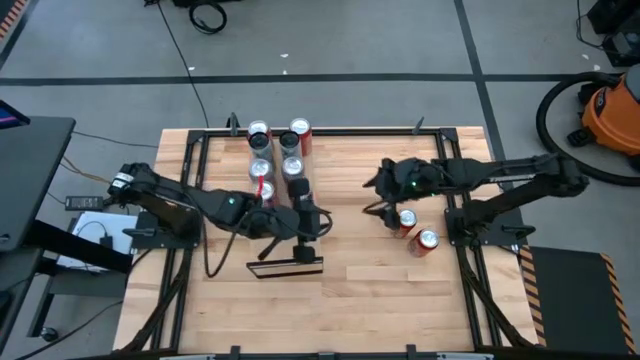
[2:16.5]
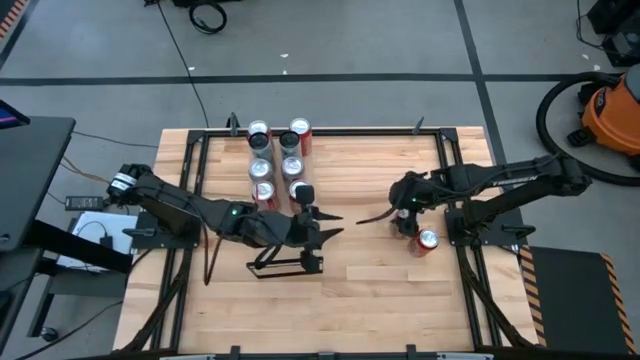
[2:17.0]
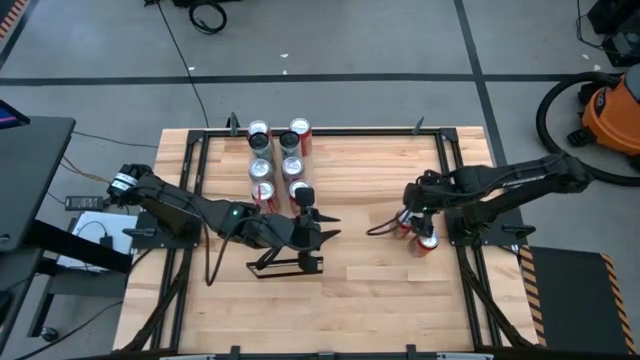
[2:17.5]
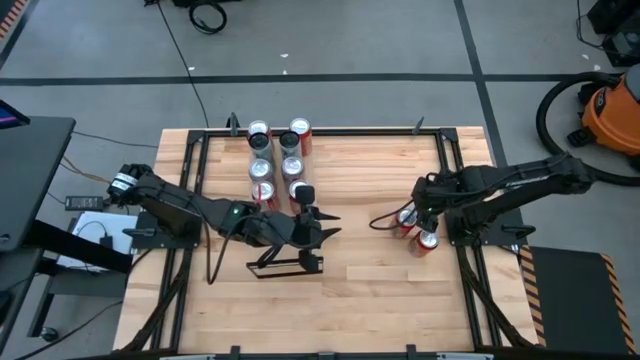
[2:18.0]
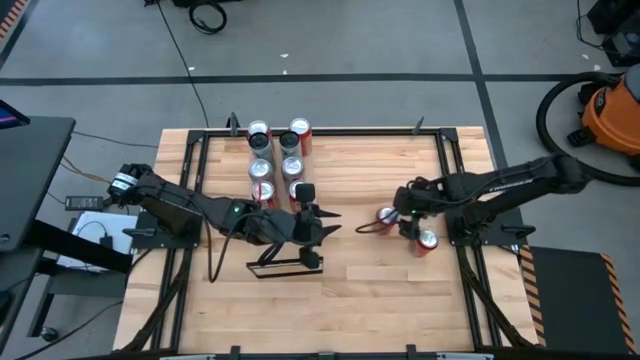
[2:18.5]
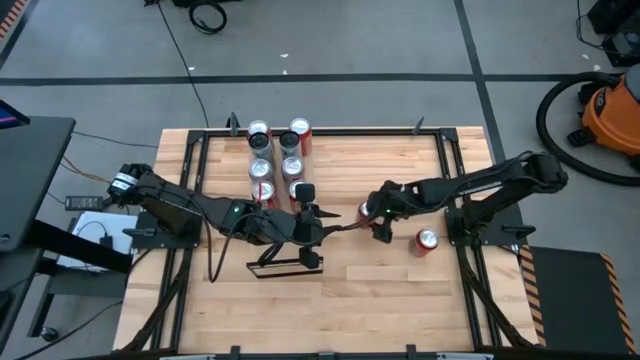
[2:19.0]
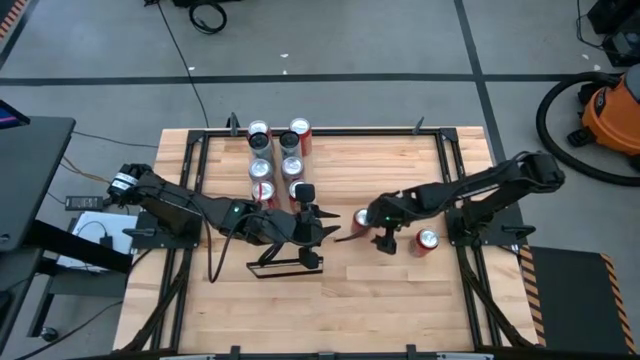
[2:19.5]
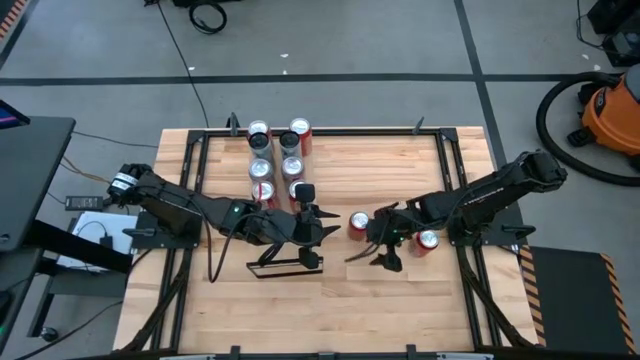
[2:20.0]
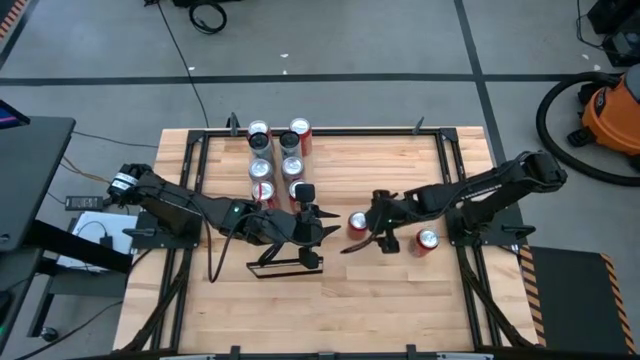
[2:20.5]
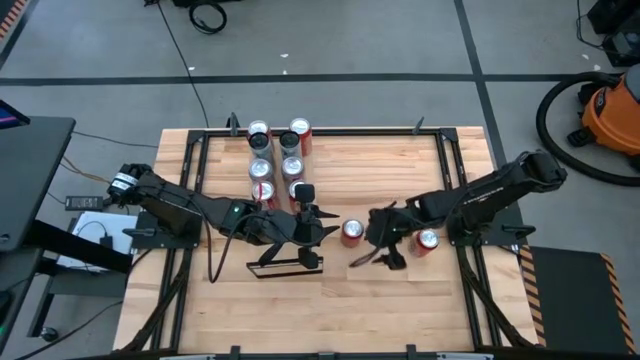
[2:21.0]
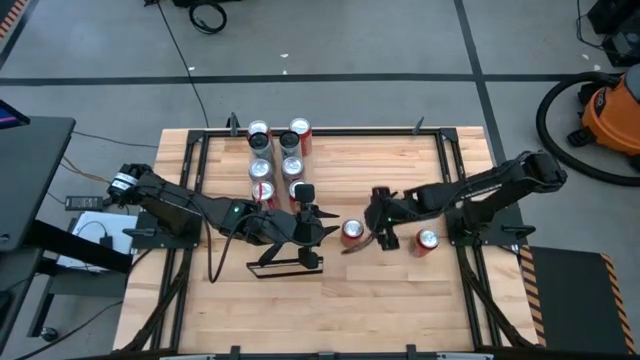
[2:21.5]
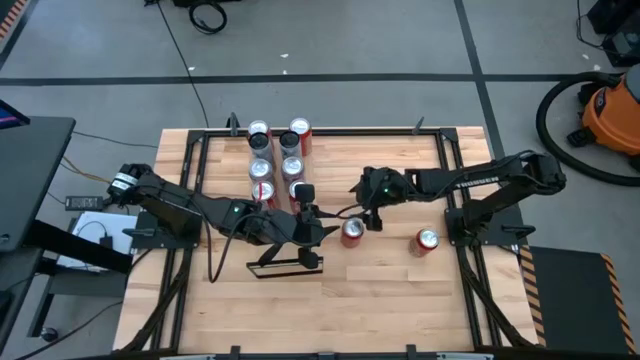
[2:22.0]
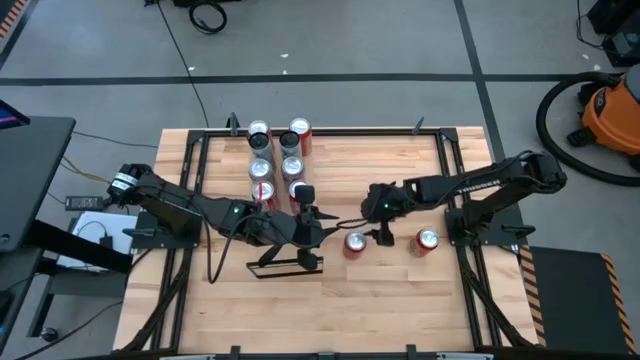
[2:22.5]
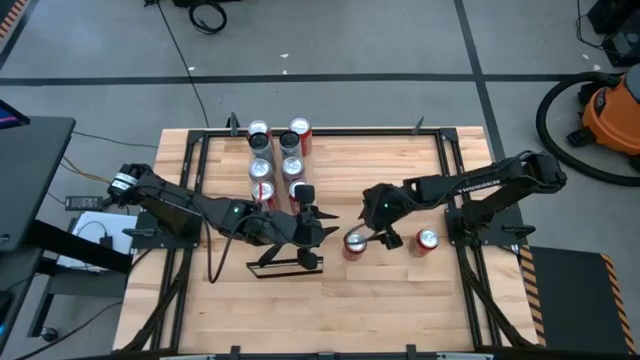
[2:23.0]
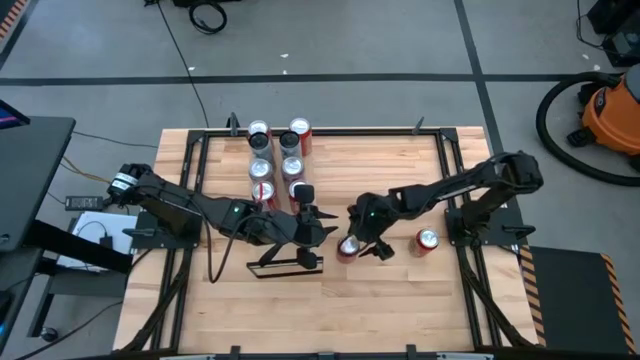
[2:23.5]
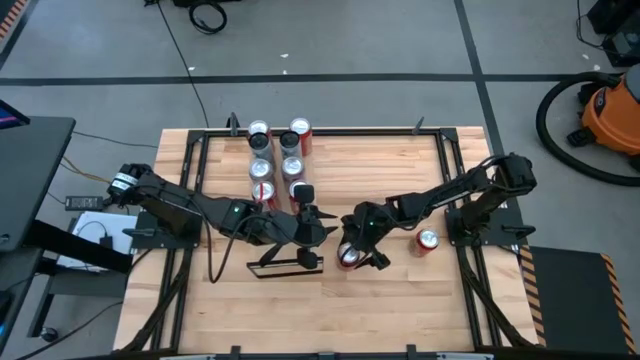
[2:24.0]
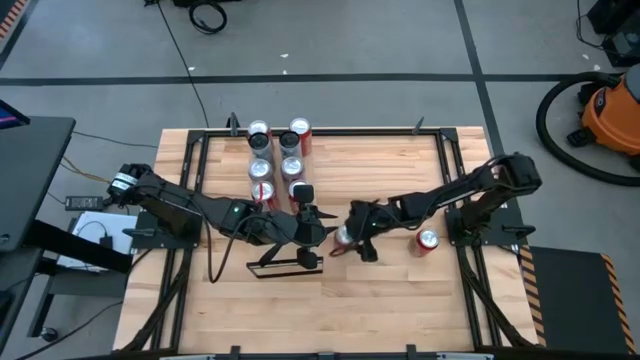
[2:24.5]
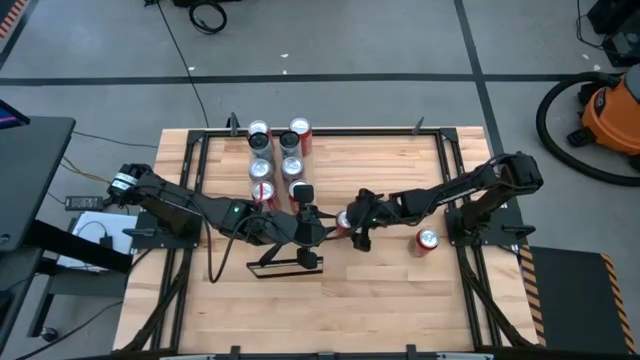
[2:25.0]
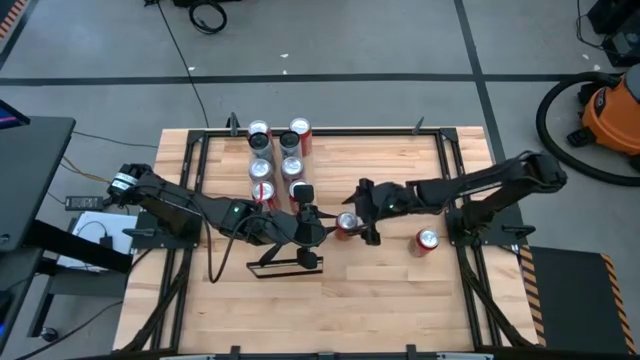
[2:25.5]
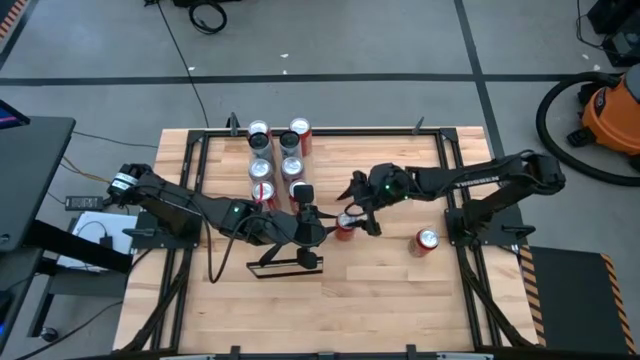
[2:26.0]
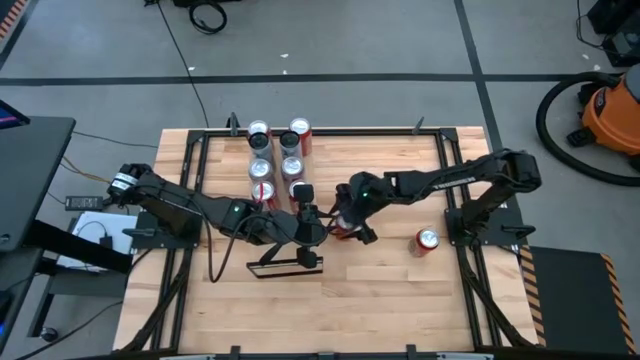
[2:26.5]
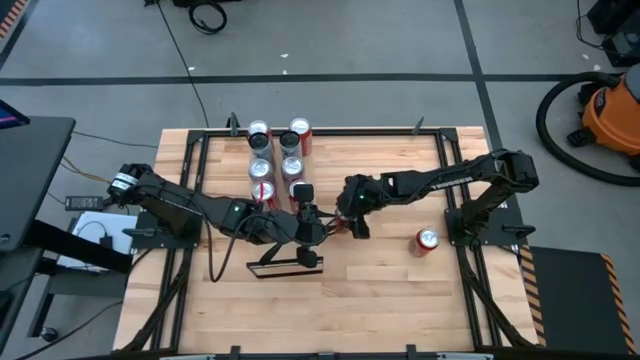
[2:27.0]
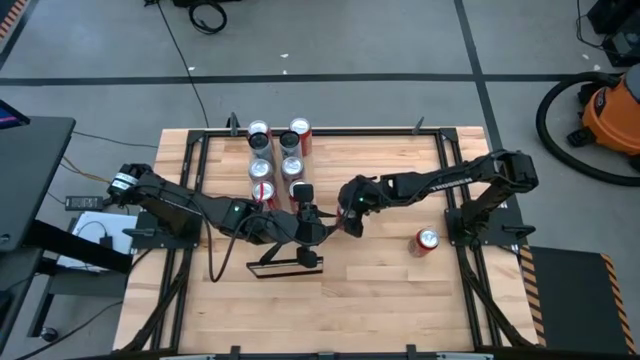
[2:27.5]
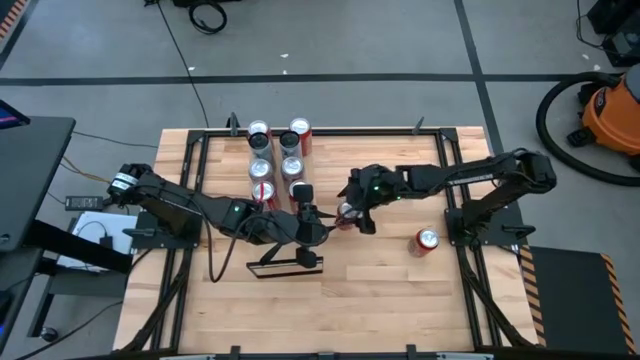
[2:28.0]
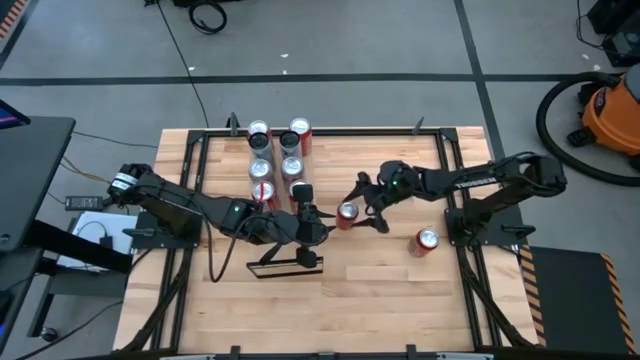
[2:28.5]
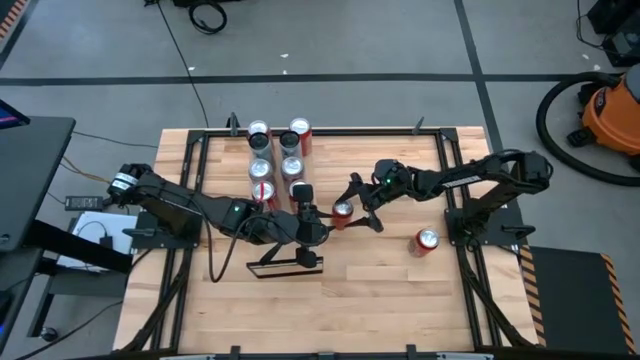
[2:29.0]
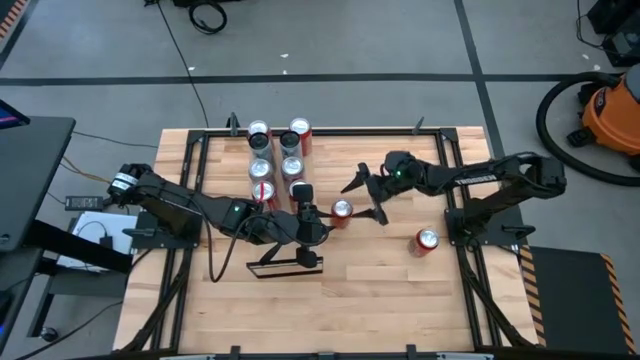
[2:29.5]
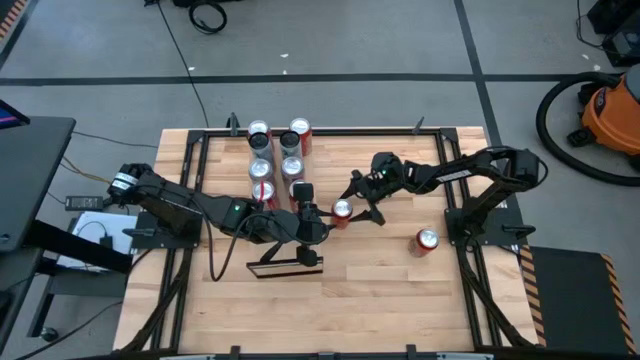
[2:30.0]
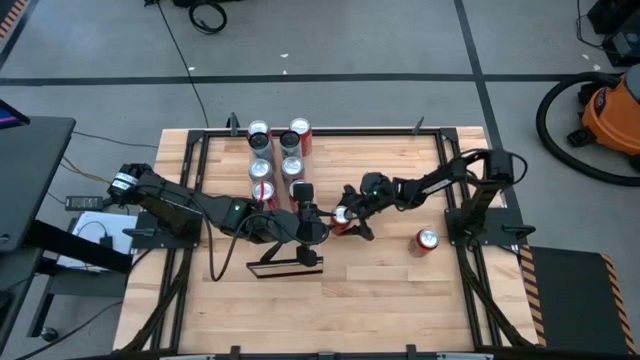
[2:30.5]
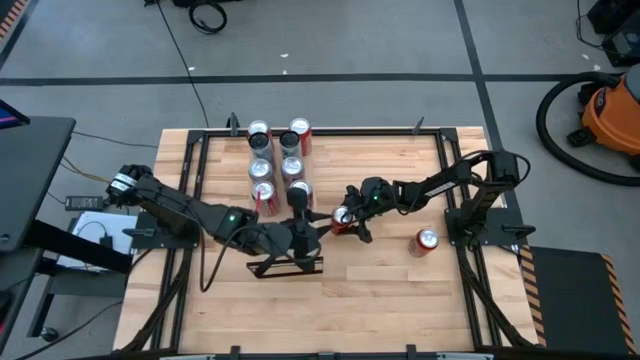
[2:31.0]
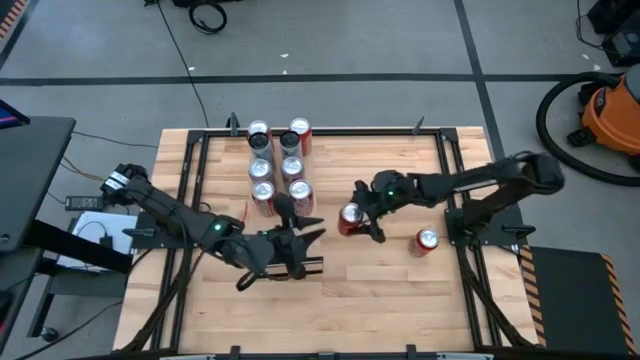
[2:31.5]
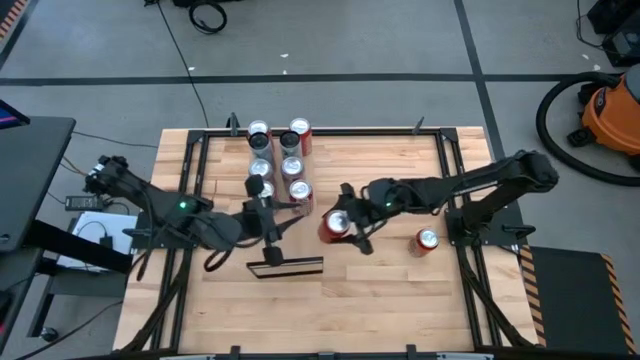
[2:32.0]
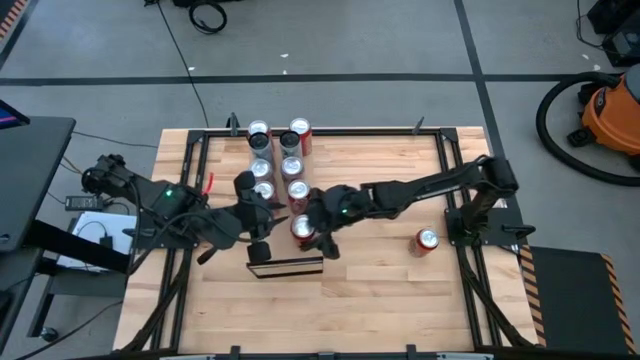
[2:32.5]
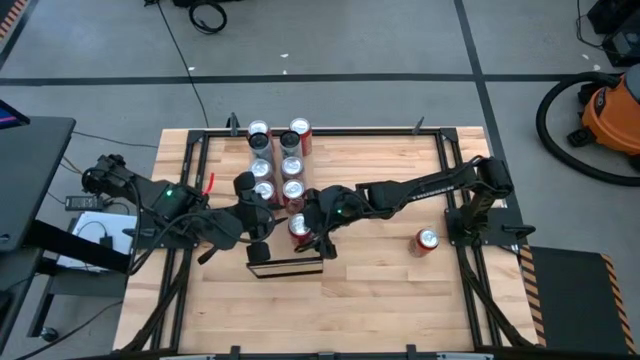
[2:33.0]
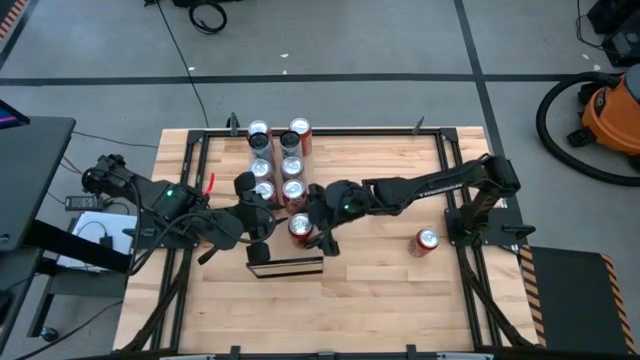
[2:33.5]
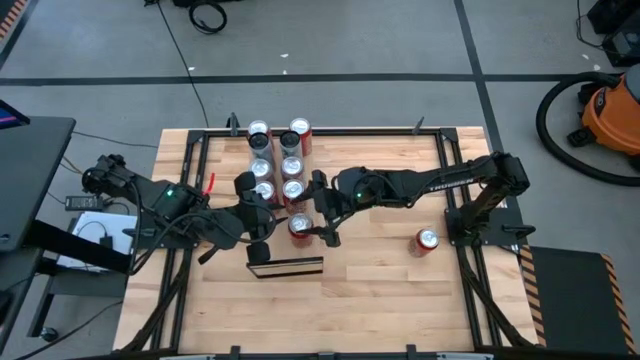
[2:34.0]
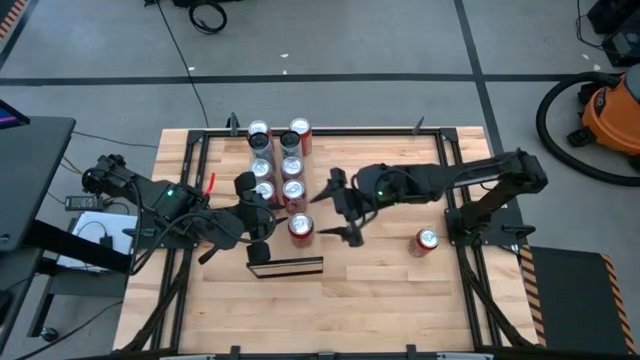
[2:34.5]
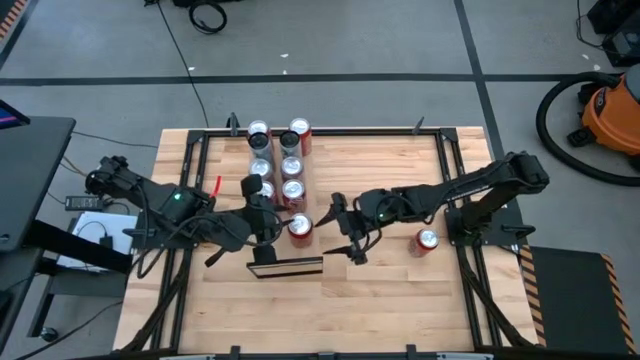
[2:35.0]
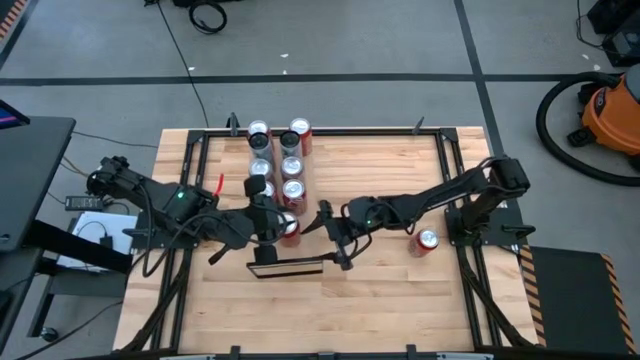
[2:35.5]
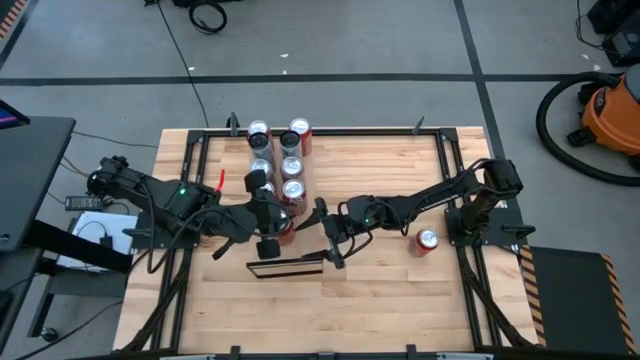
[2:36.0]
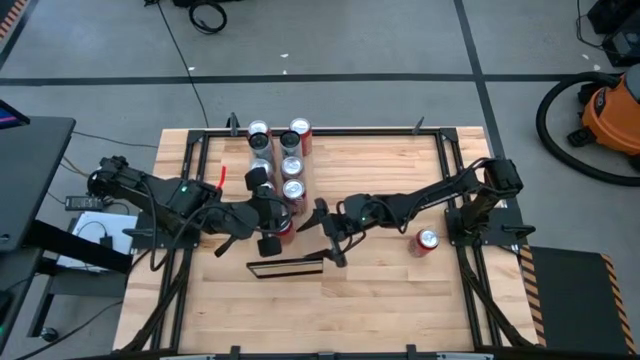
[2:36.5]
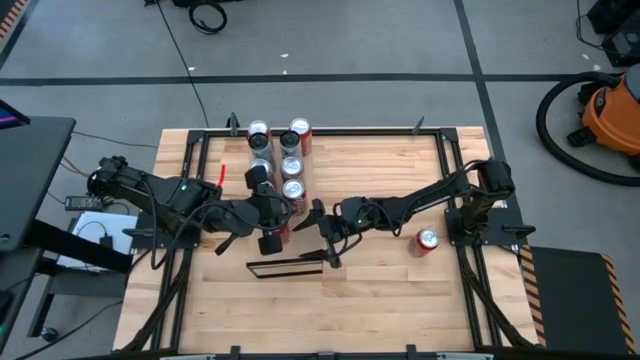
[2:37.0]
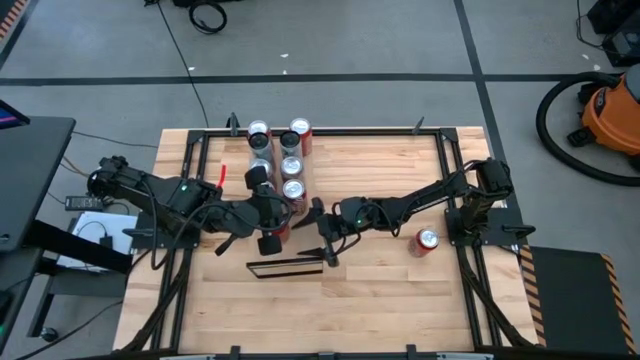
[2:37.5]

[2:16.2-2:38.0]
Task: Place canned beverage on shelf
Put the left red and black soda can on the shelf
